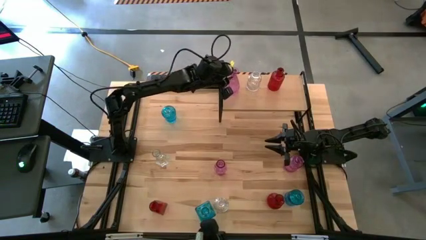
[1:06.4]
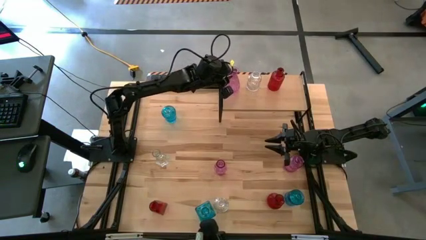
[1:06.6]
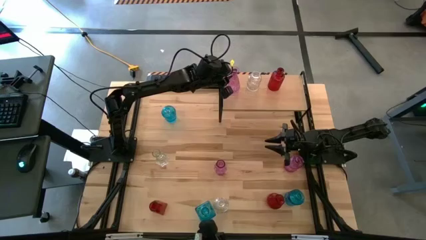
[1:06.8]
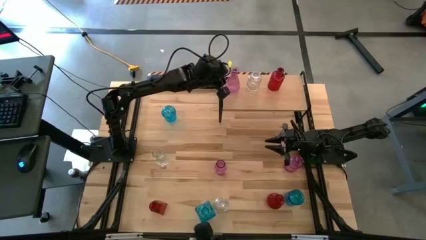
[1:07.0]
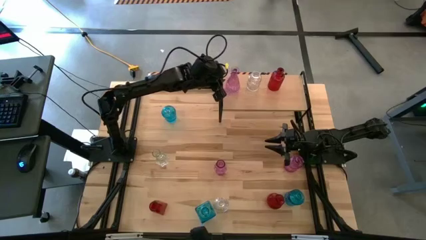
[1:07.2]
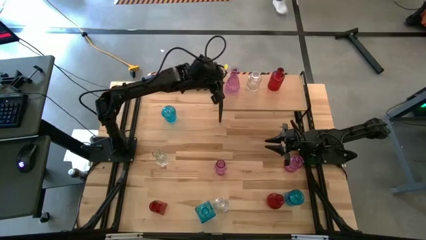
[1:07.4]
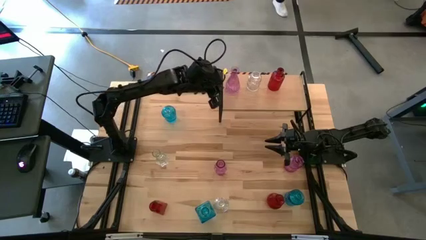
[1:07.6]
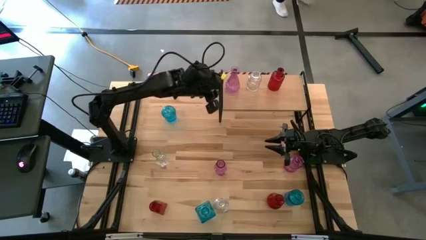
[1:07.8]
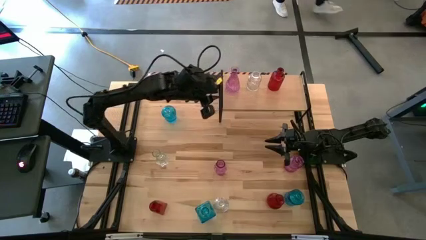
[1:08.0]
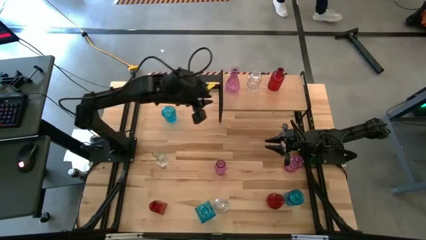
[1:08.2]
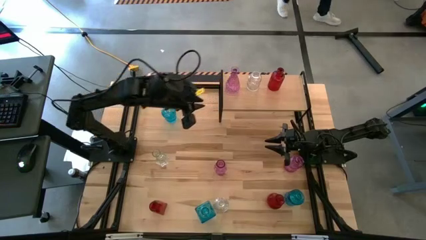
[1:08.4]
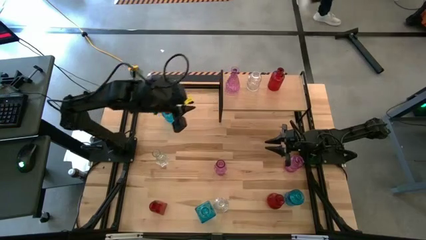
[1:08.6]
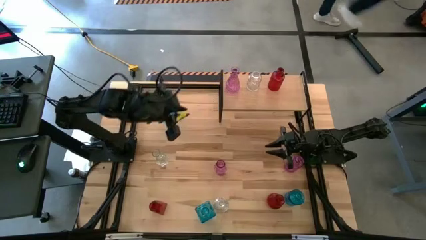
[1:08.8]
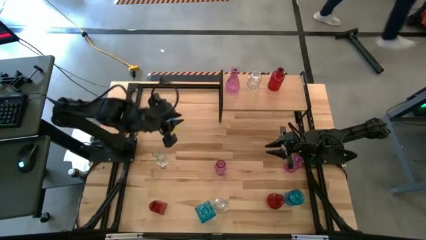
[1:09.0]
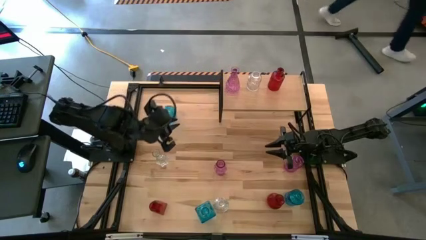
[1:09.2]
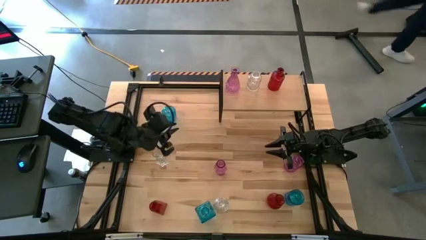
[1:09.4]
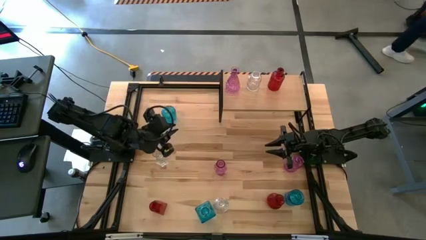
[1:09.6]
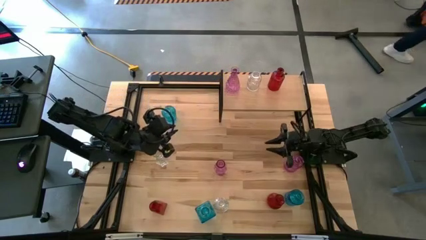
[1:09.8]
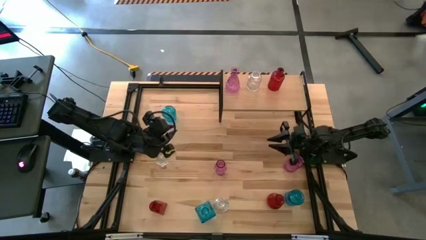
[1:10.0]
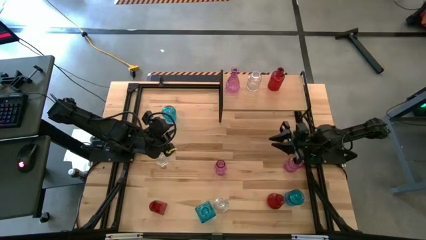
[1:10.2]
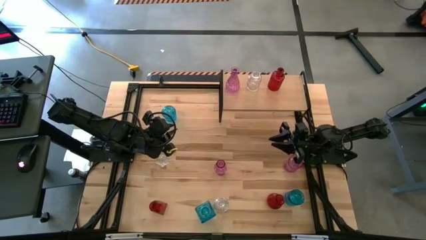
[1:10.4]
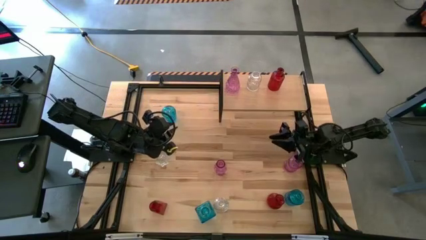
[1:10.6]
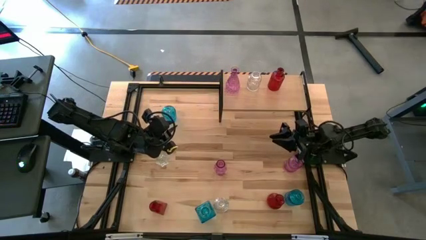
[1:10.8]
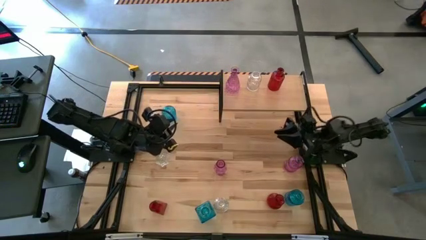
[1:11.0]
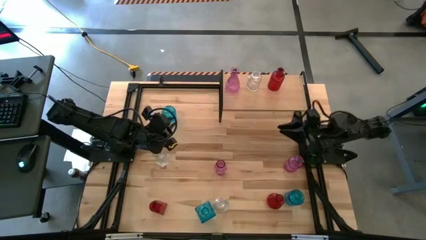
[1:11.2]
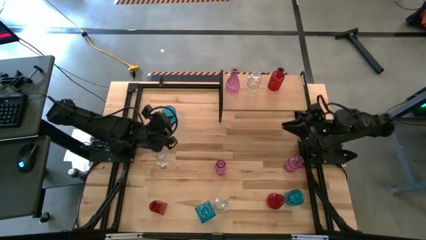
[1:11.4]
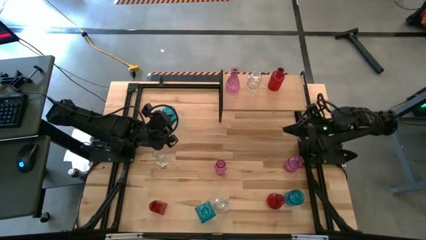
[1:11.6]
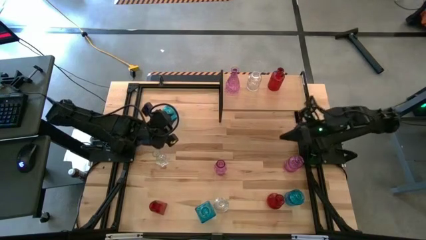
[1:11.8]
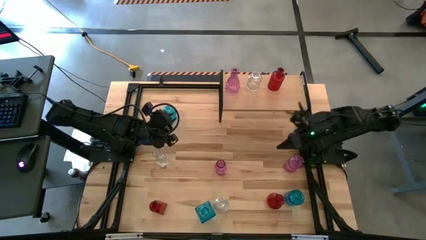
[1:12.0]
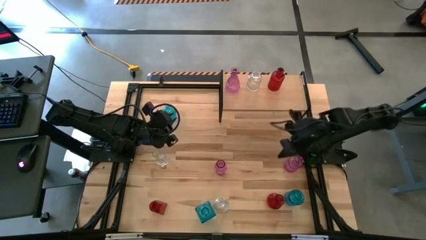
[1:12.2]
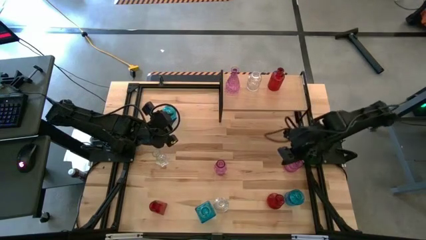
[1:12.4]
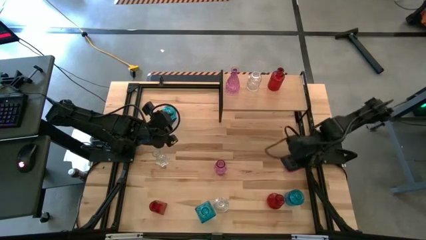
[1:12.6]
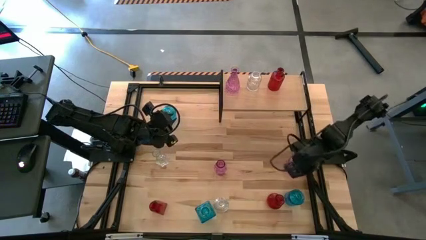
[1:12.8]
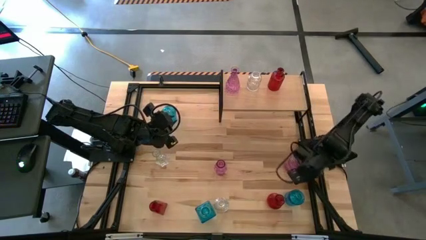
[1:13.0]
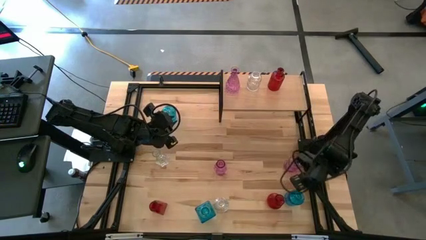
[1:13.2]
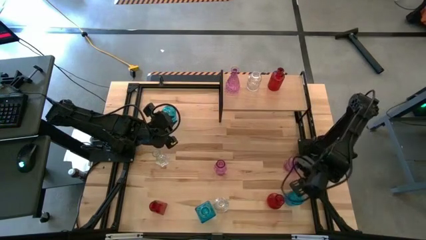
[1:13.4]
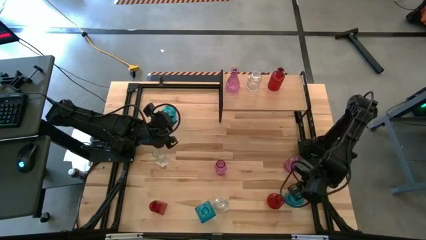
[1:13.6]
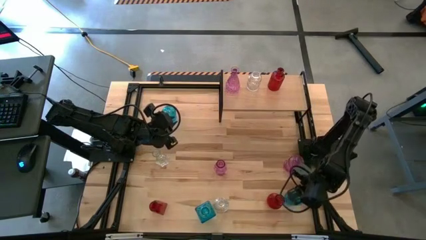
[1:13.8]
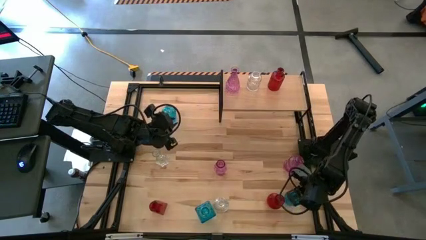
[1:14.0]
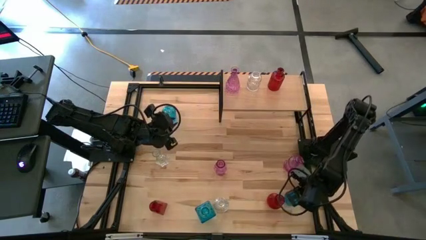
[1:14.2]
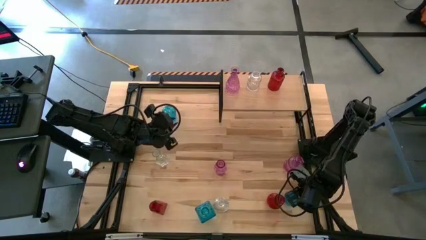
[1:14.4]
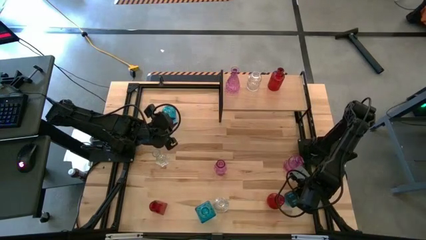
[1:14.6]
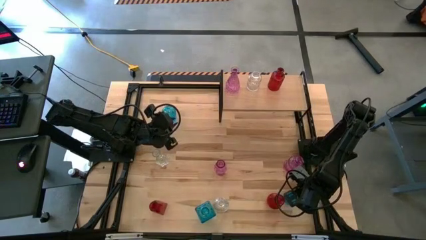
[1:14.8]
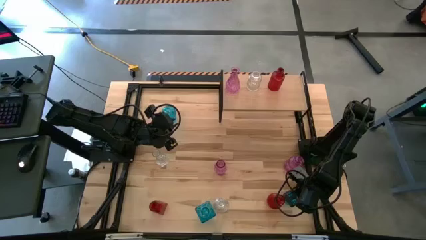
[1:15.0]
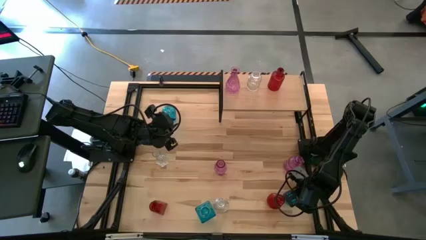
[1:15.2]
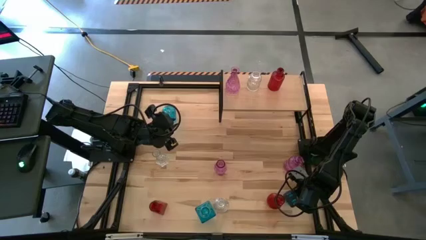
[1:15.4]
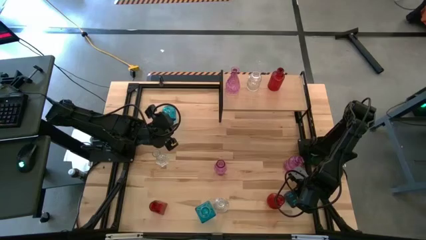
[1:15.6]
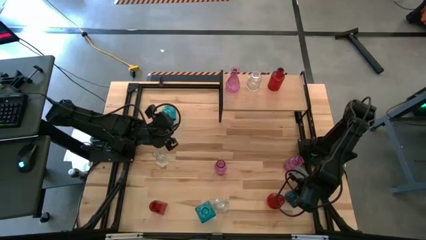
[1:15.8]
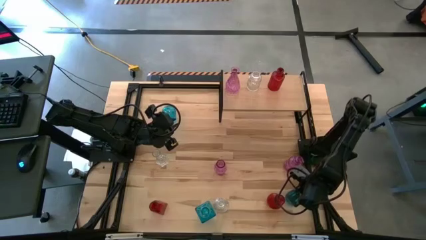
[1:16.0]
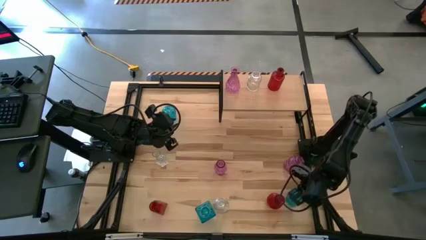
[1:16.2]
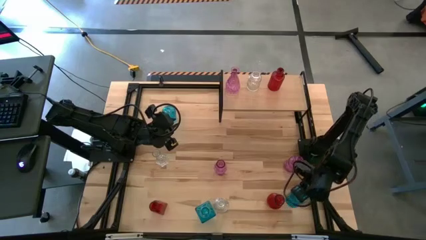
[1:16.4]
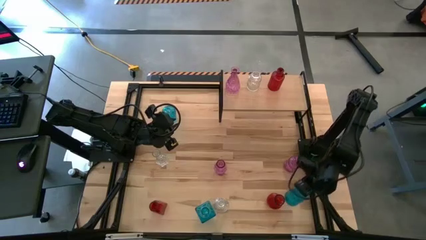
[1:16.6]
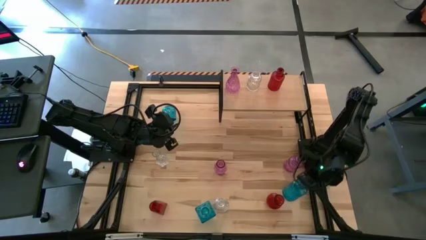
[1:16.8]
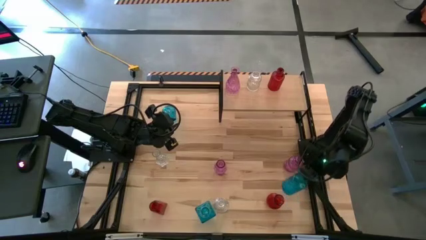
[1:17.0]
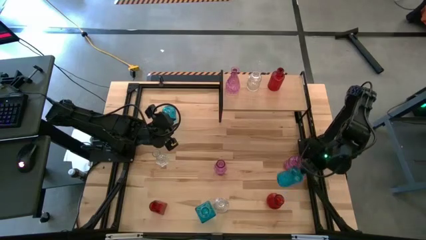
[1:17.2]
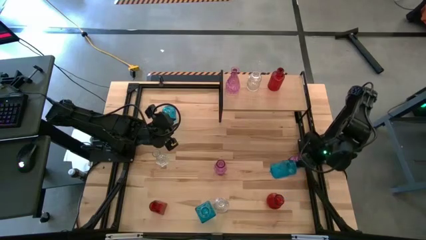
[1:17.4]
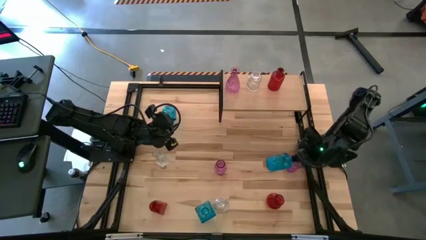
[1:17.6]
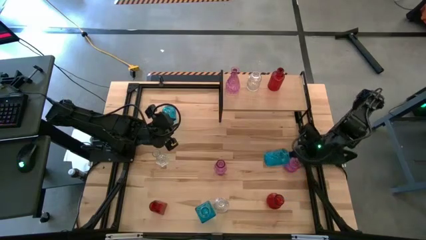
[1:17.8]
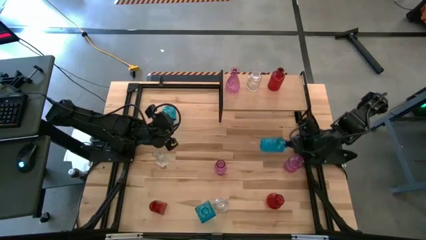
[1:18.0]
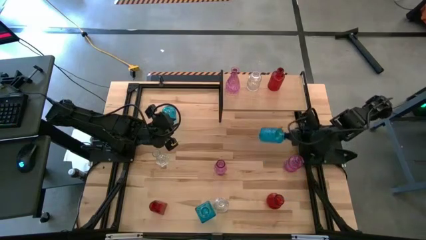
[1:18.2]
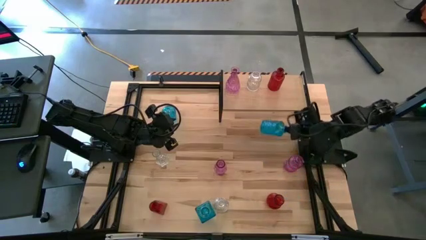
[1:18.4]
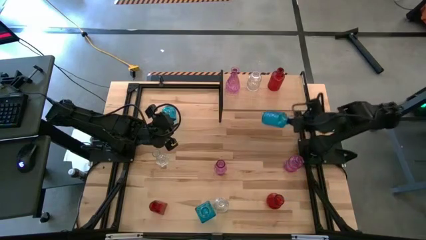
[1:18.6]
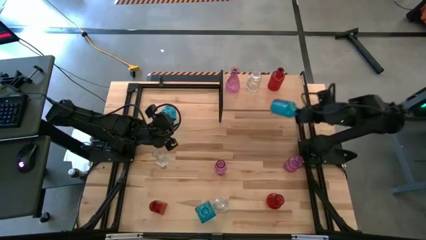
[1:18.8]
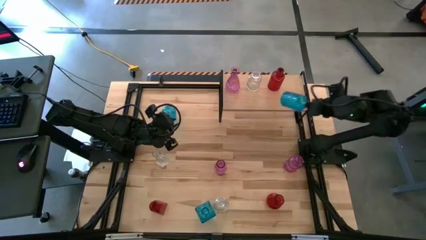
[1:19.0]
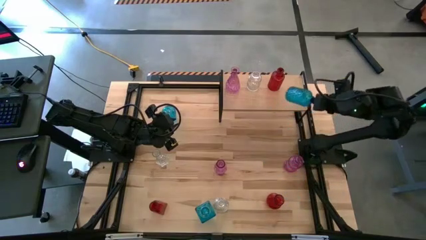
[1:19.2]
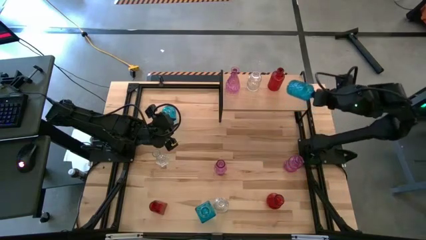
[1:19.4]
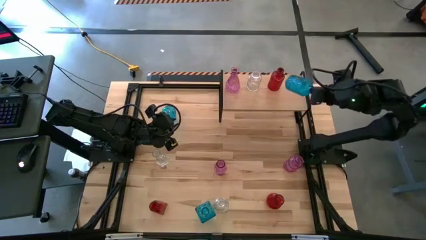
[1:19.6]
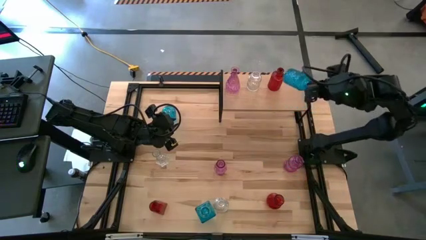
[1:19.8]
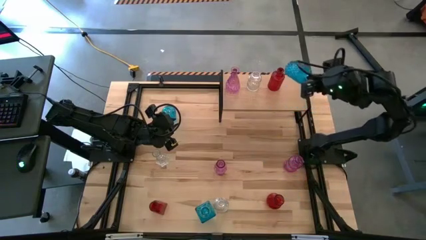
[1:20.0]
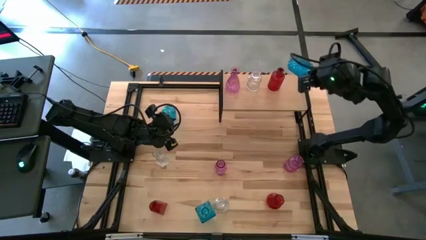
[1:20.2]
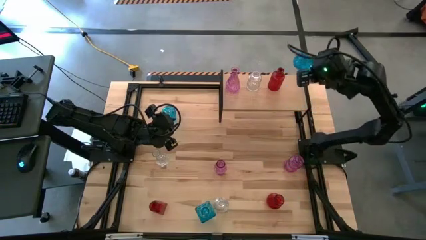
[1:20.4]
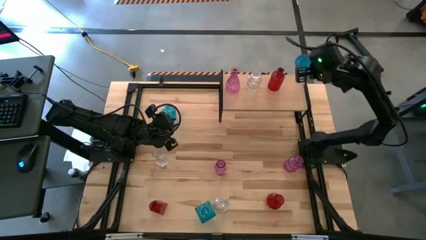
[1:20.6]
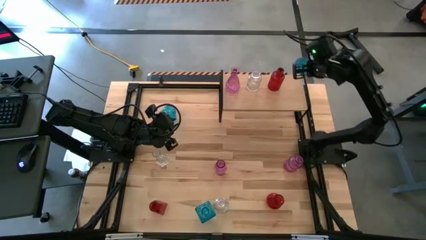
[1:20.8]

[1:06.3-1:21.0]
Task: sort vases onto shelf
Put the bottom right blue vase on the shelf
